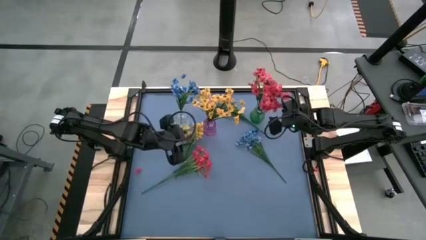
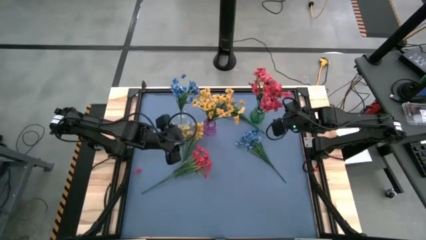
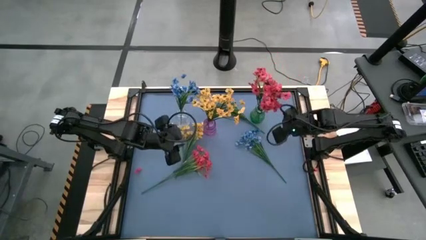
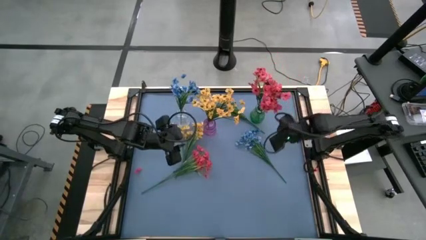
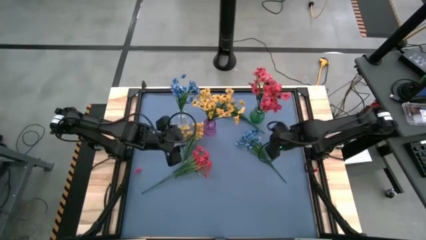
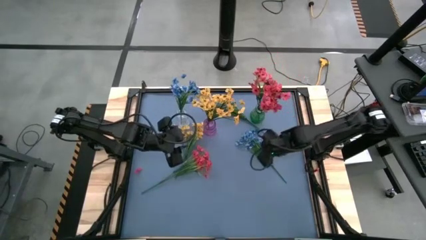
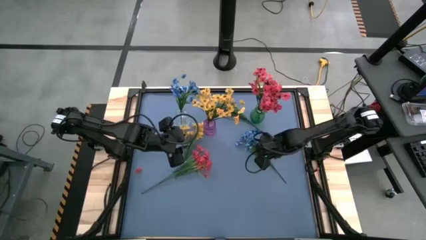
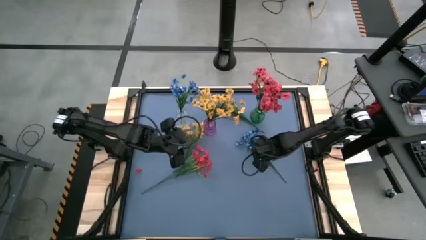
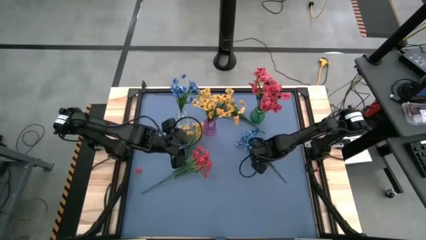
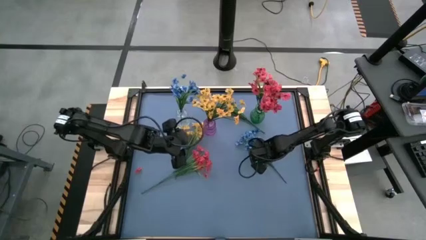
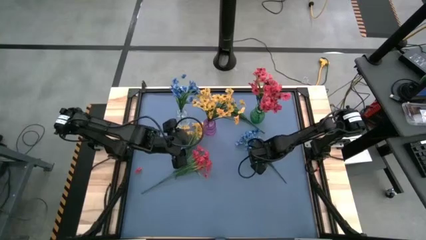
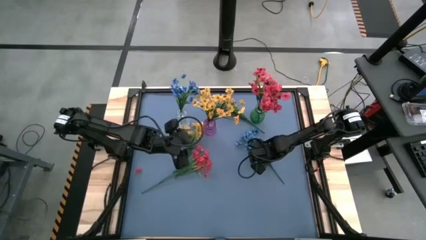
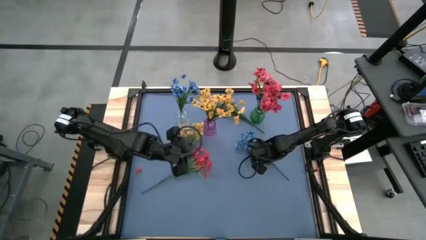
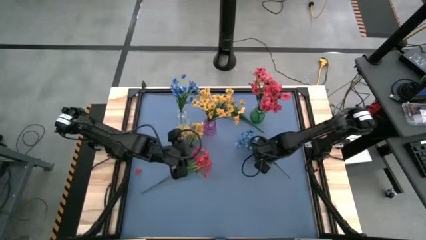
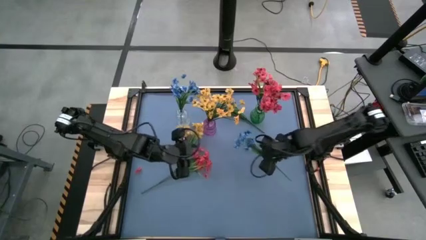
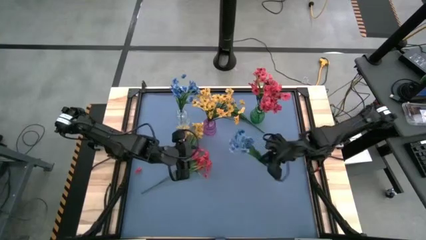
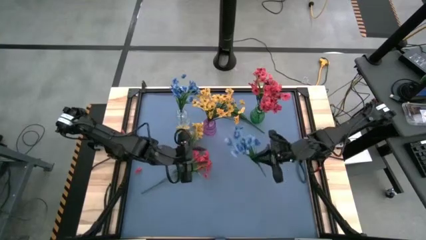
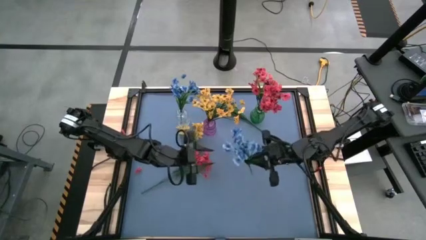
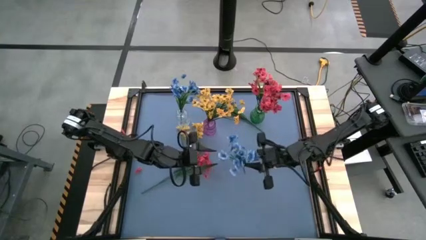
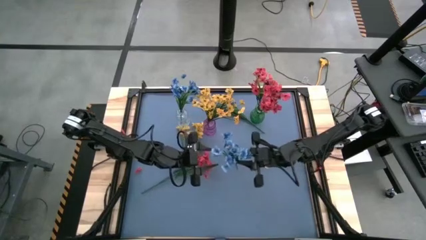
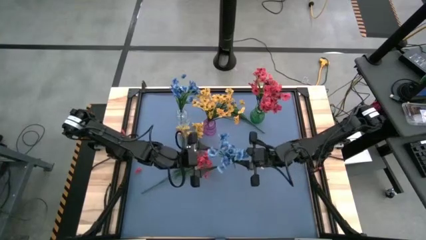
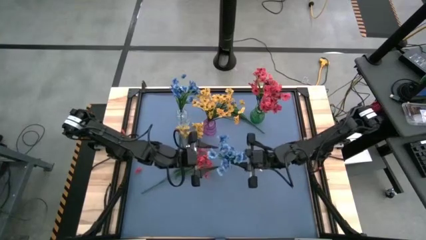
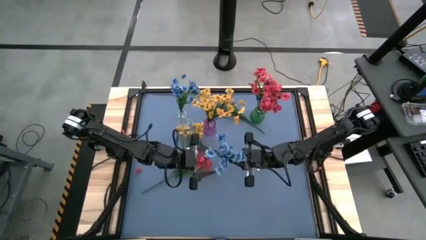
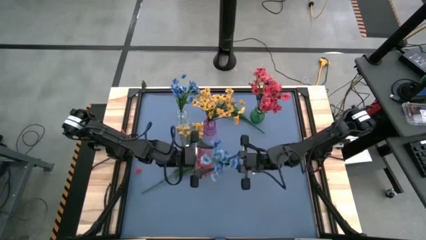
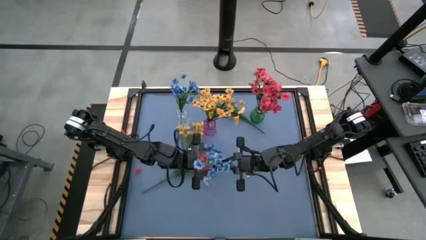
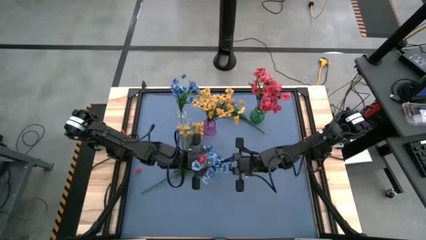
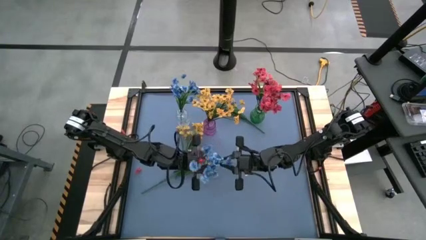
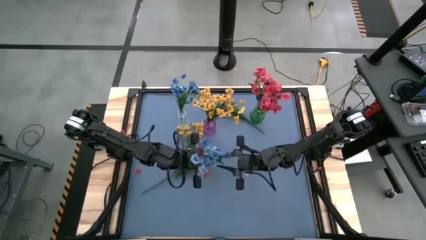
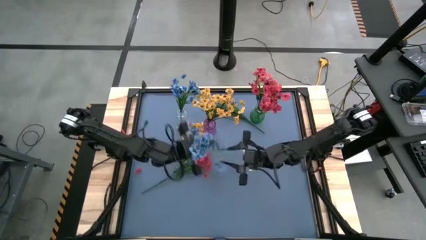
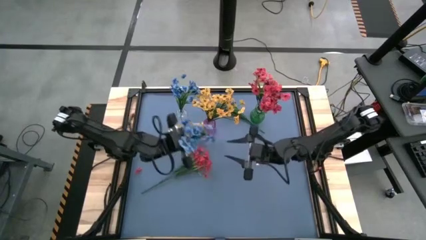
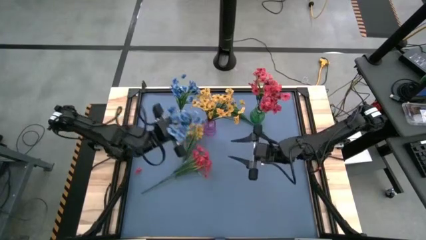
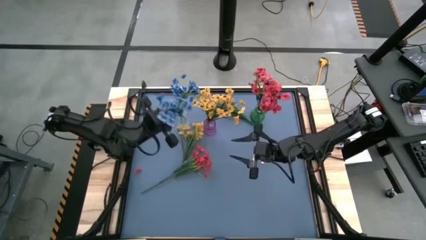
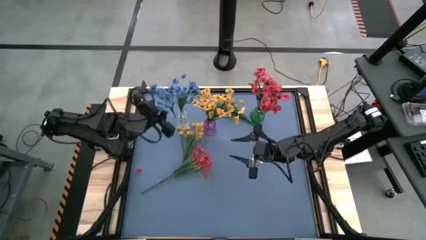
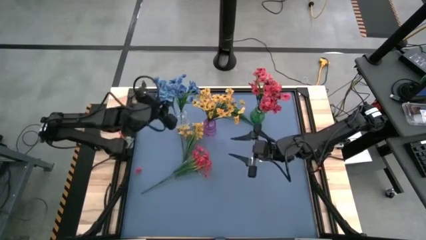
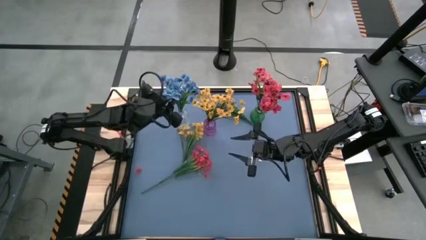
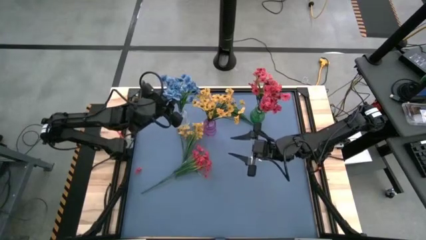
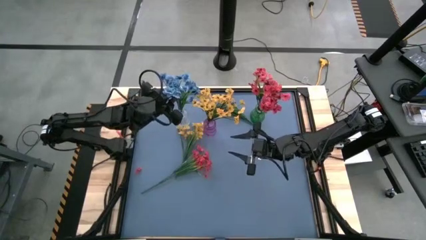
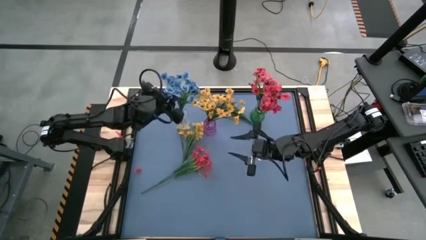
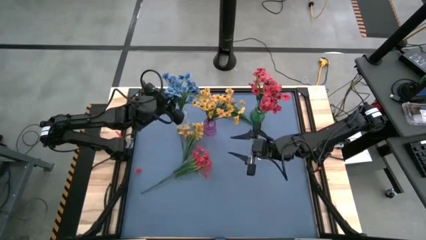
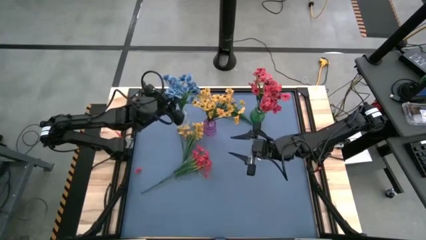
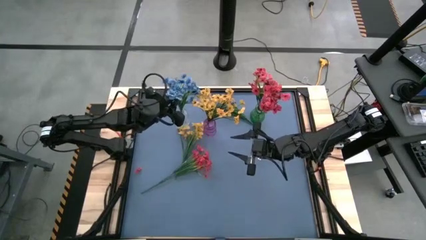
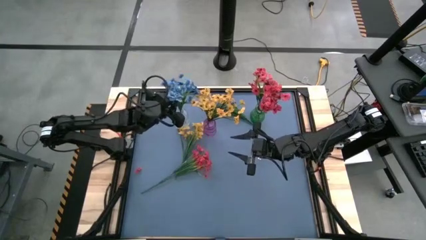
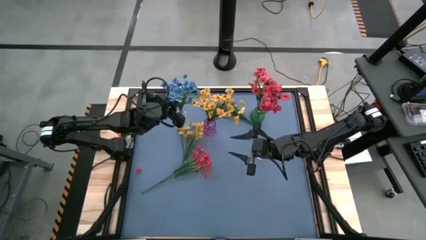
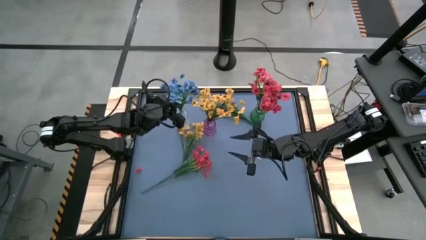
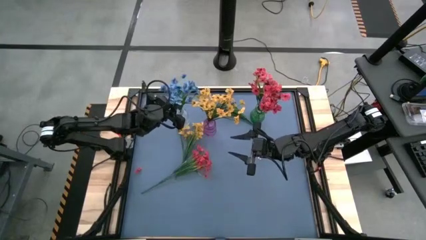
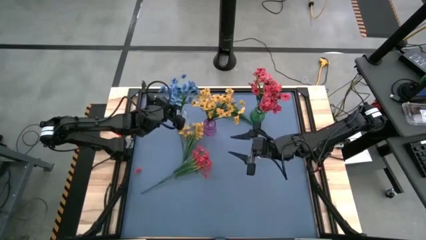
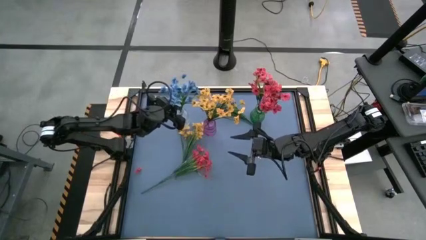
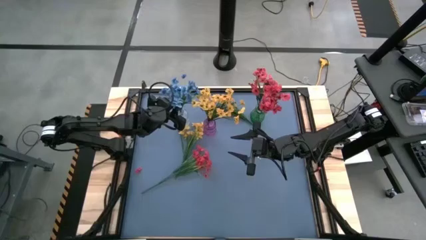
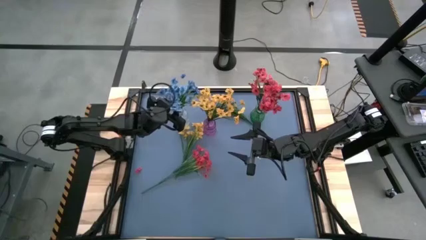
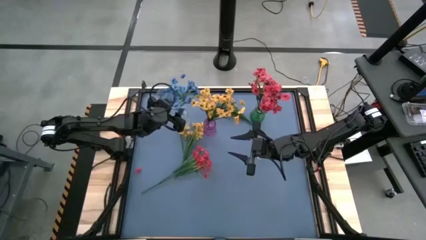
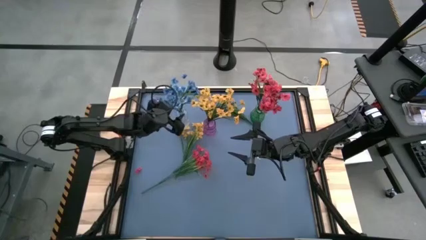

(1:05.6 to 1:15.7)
Task: Sort flowers into vase by color
Put the bottom blue flowers into the transparent vase

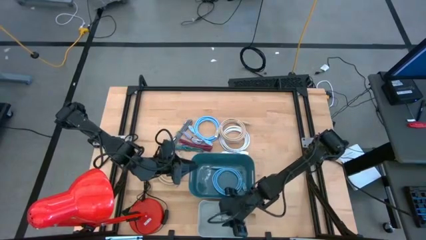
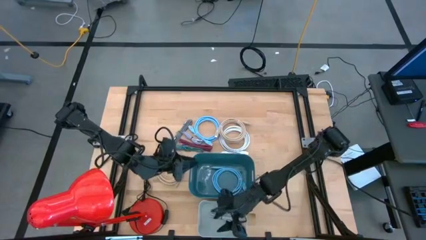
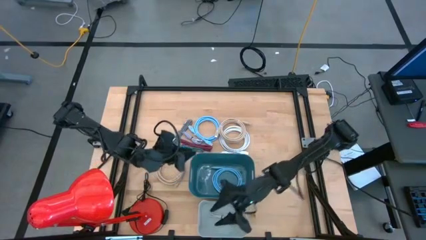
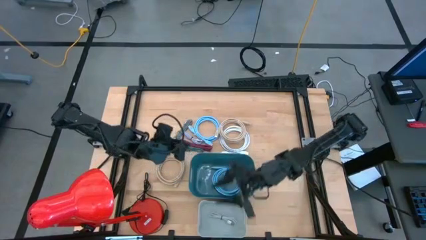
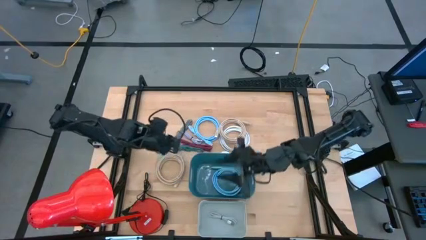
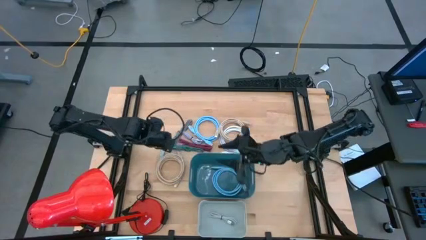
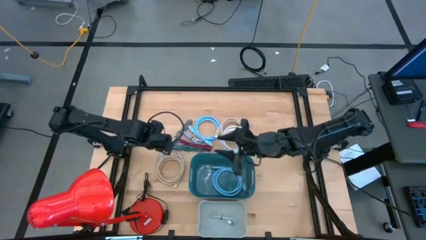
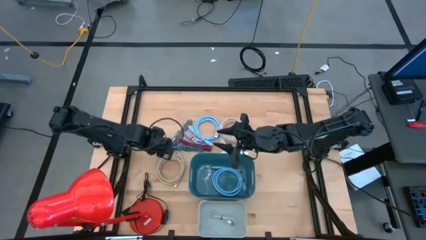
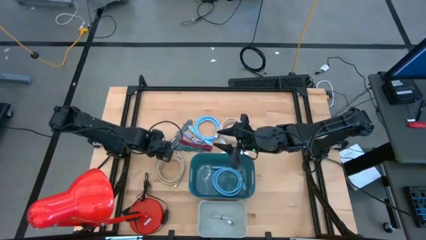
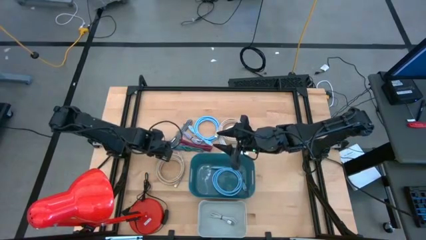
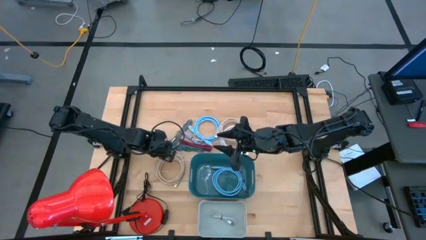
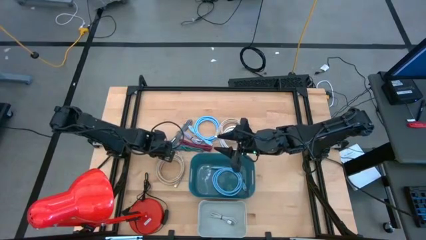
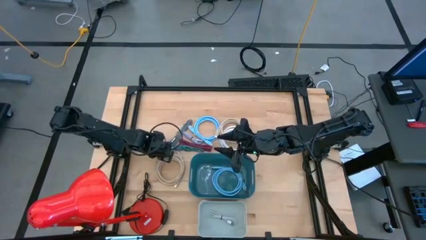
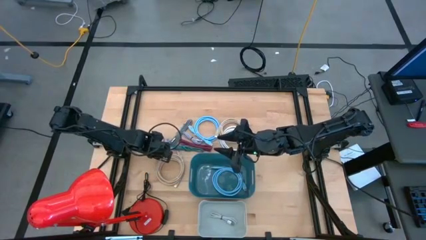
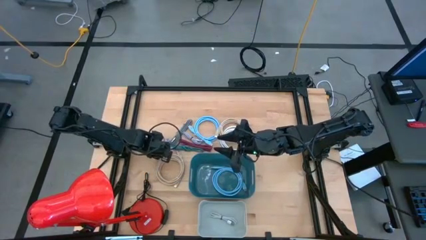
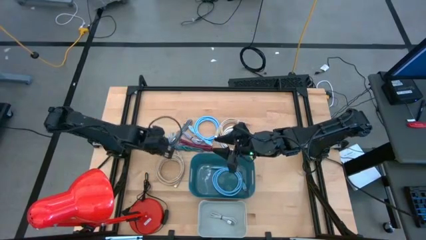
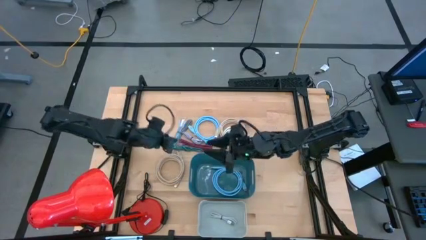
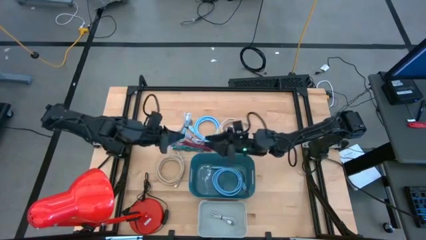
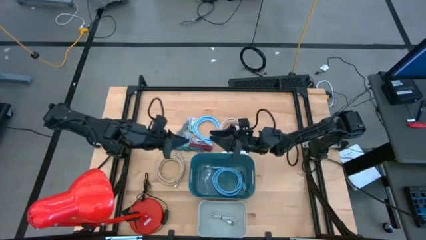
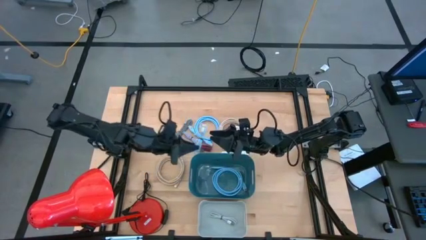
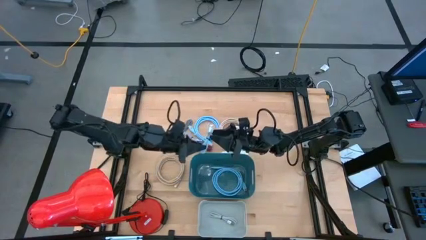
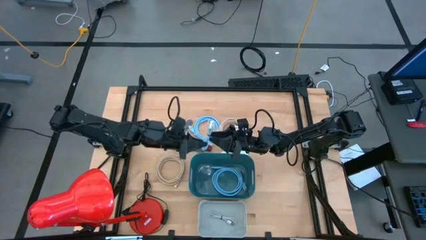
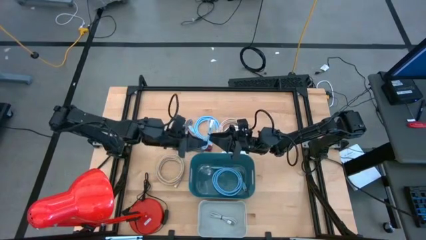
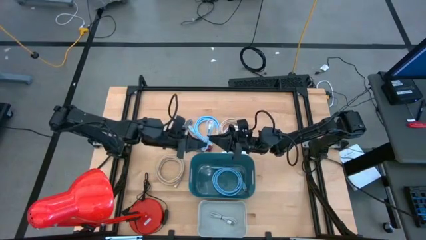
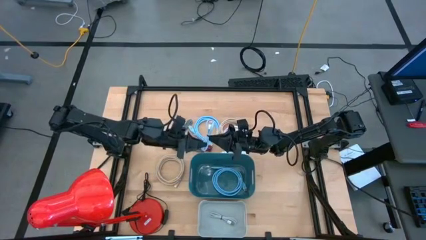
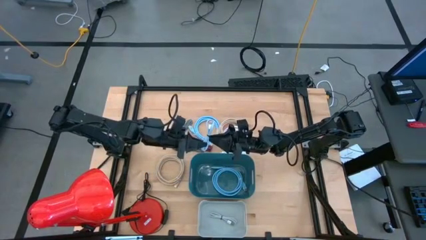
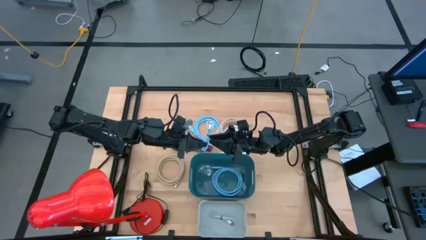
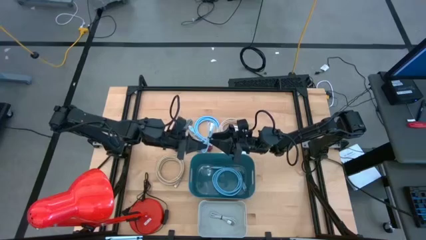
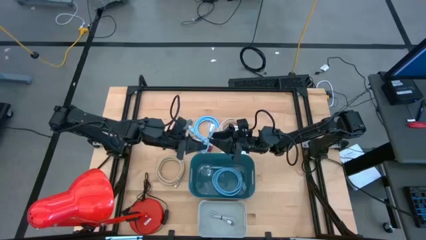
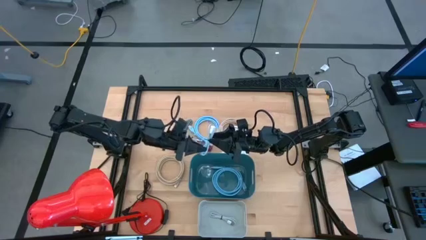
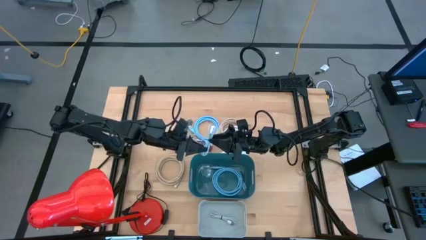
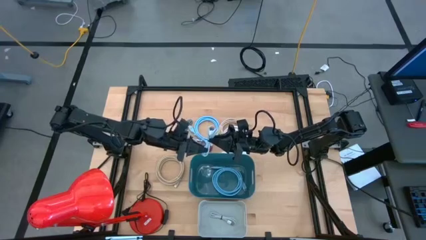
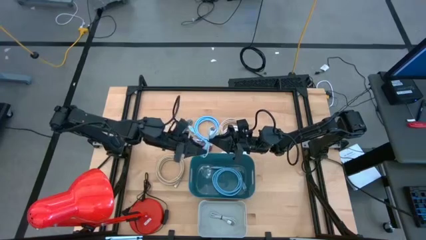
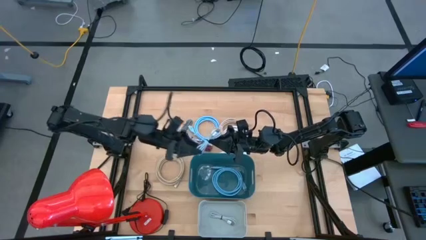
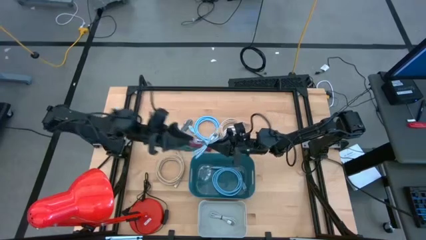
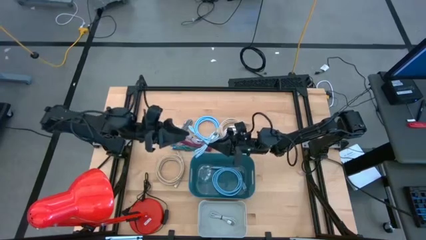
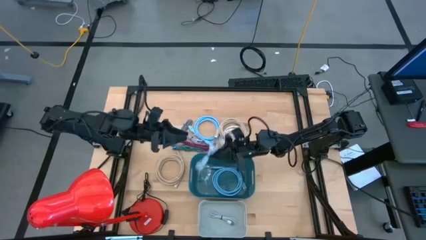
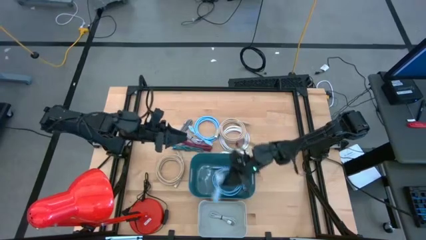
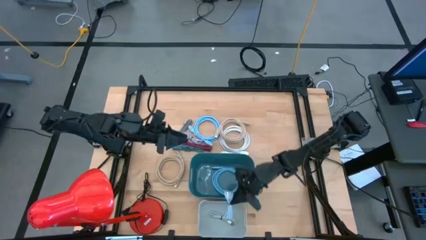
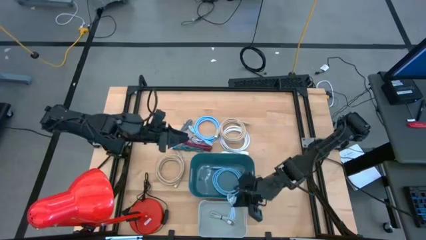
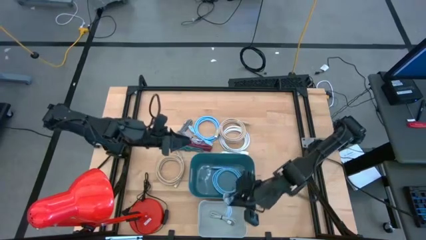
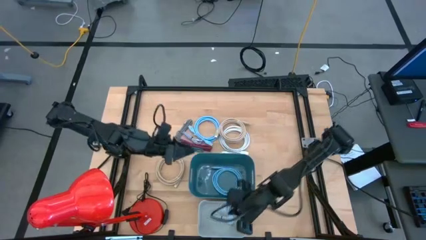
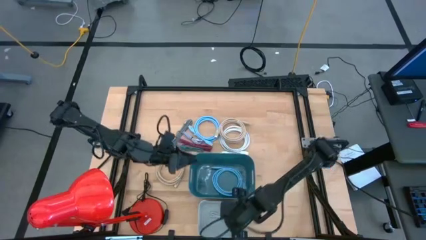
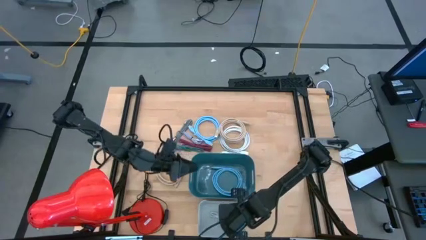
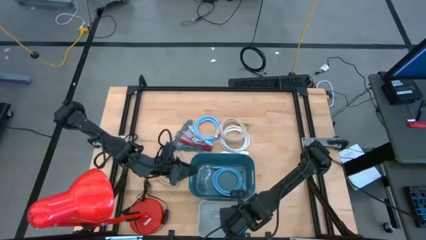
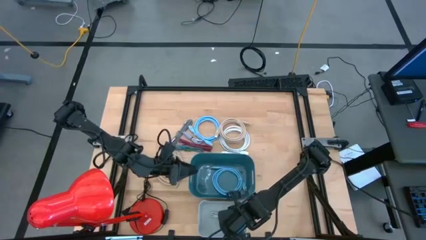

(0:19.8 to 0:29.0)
Task: Pick & Place USB Port
Put the blue USB cable into the gray bin
